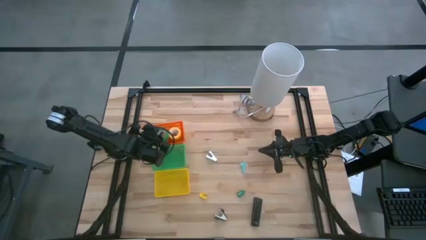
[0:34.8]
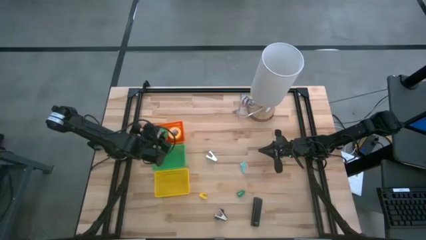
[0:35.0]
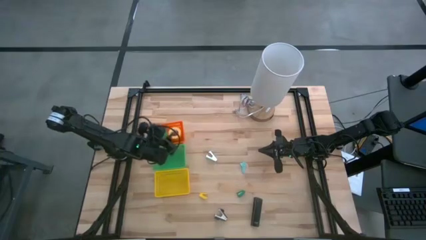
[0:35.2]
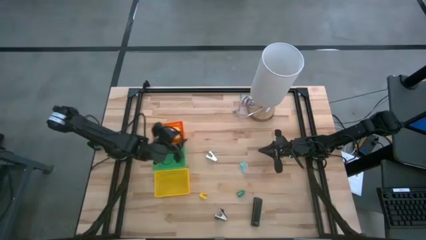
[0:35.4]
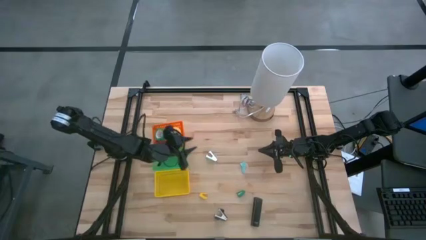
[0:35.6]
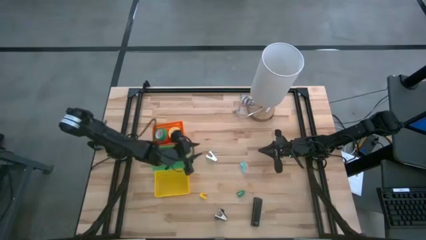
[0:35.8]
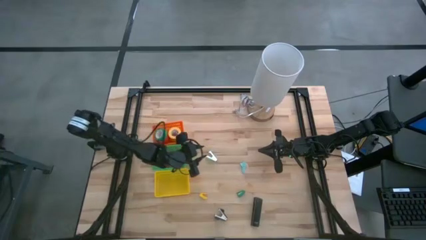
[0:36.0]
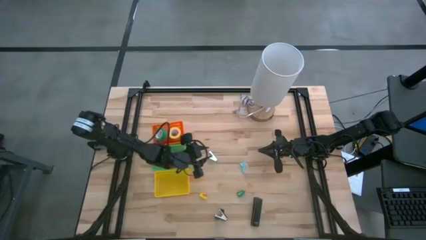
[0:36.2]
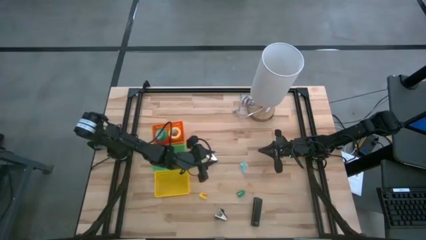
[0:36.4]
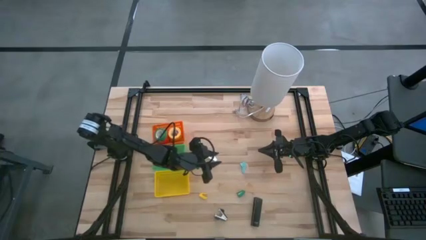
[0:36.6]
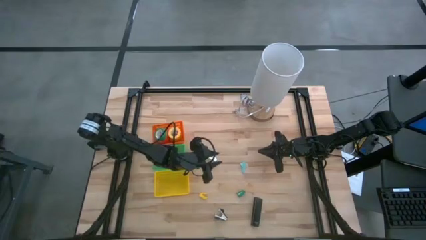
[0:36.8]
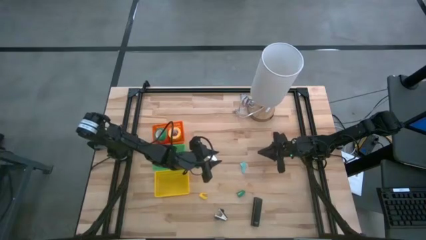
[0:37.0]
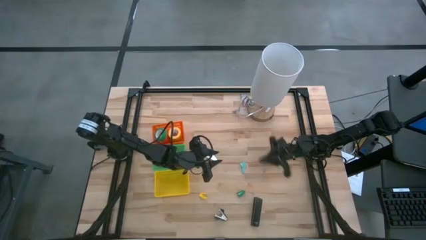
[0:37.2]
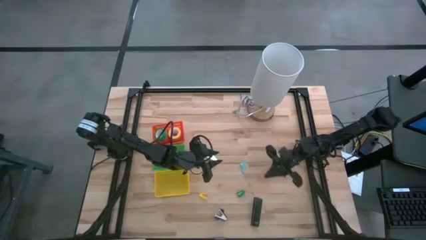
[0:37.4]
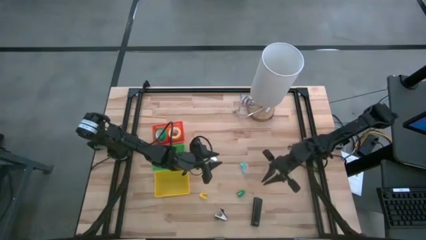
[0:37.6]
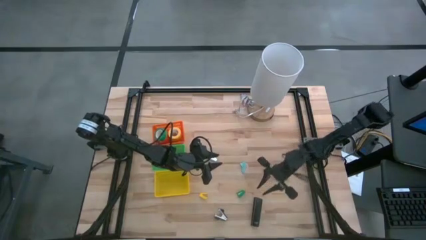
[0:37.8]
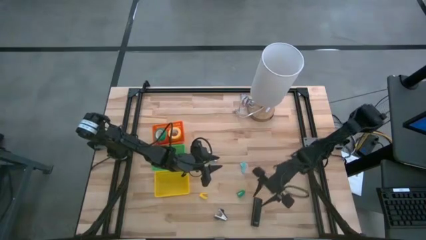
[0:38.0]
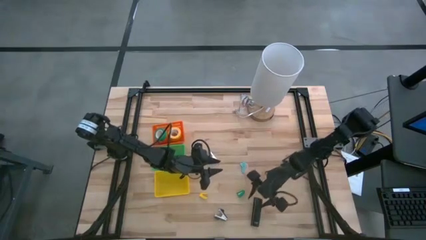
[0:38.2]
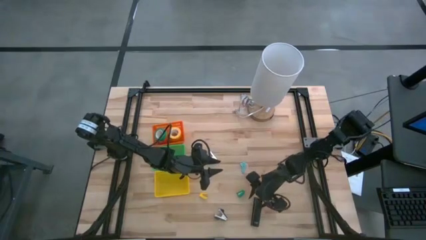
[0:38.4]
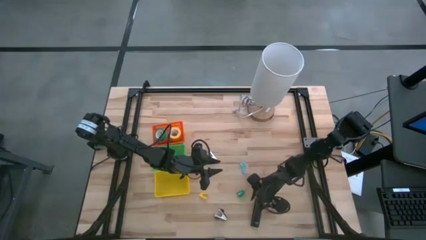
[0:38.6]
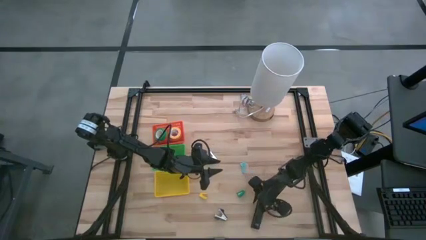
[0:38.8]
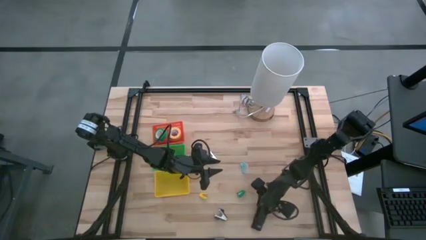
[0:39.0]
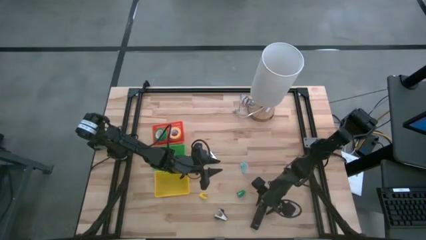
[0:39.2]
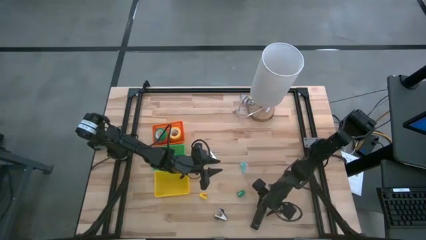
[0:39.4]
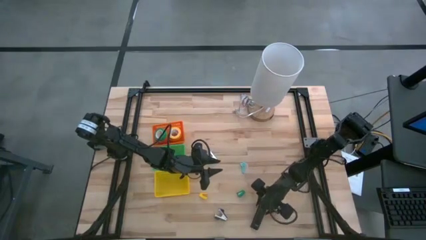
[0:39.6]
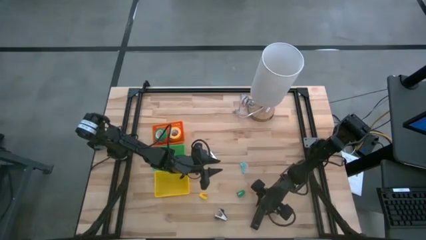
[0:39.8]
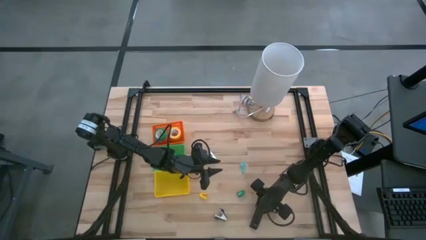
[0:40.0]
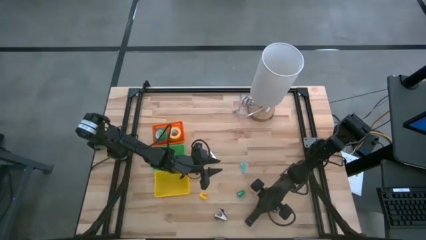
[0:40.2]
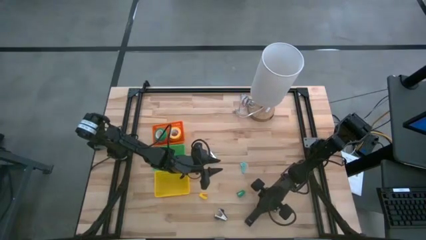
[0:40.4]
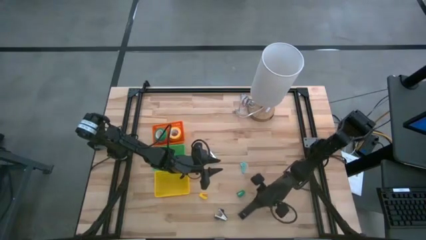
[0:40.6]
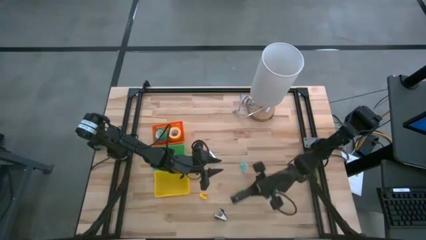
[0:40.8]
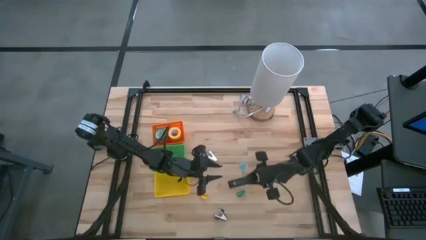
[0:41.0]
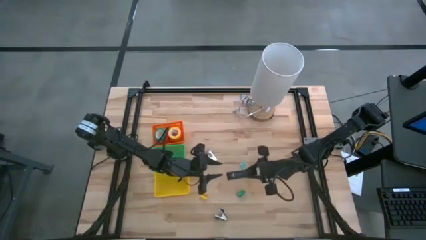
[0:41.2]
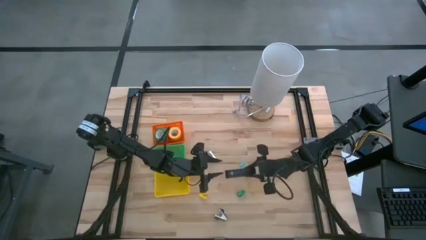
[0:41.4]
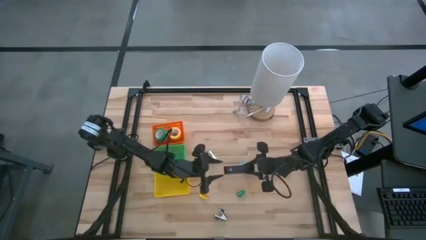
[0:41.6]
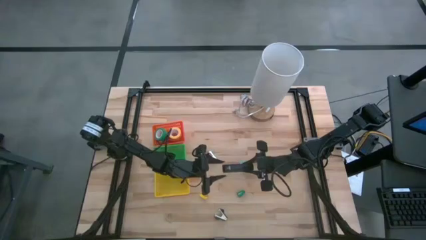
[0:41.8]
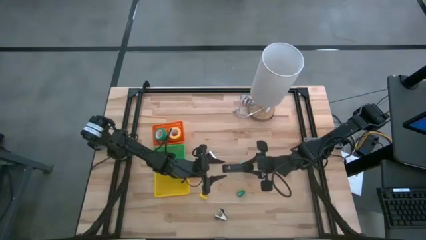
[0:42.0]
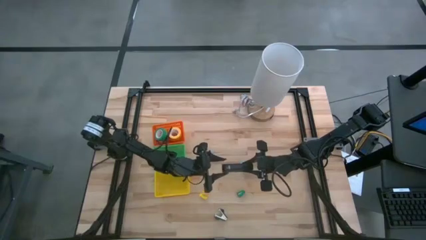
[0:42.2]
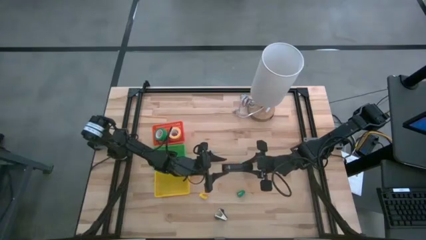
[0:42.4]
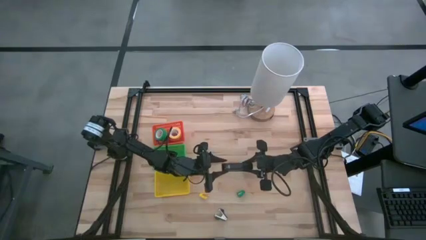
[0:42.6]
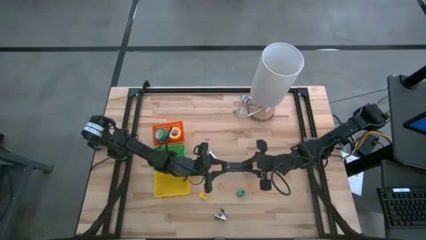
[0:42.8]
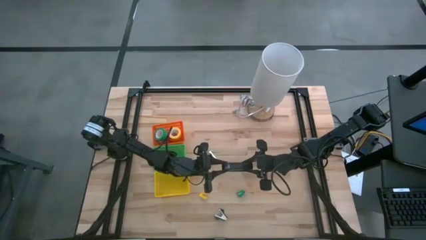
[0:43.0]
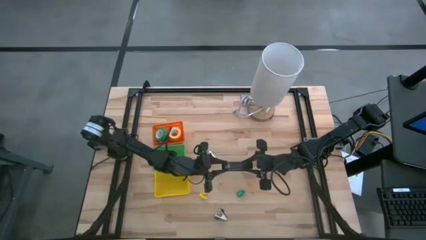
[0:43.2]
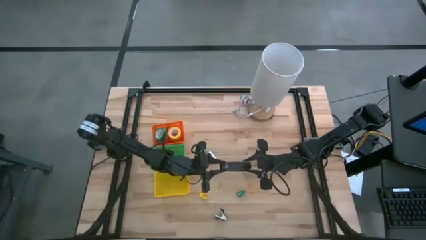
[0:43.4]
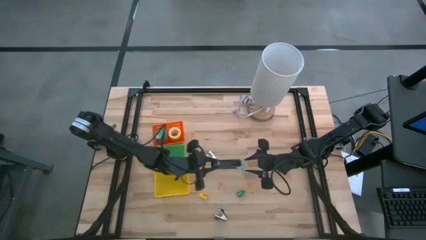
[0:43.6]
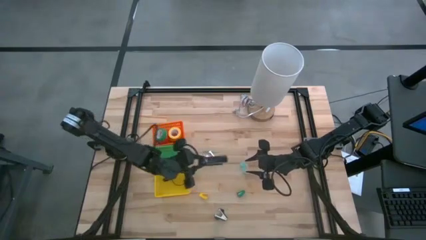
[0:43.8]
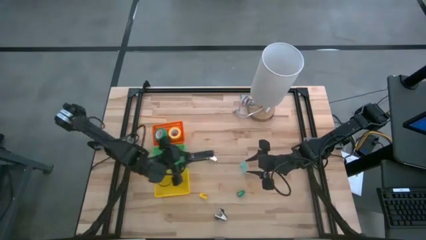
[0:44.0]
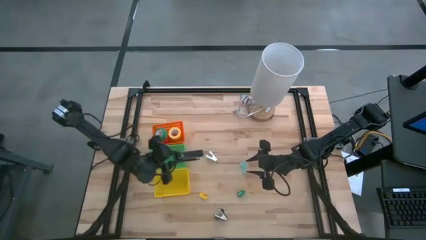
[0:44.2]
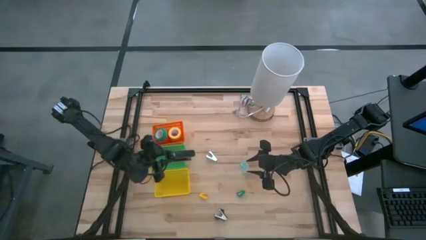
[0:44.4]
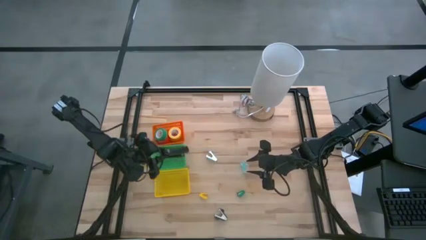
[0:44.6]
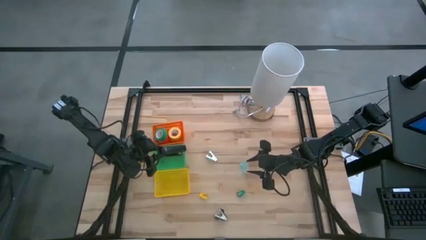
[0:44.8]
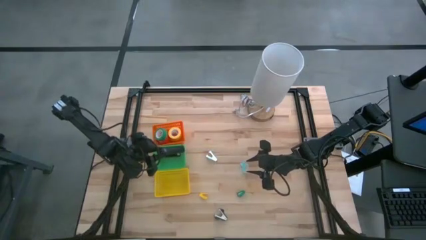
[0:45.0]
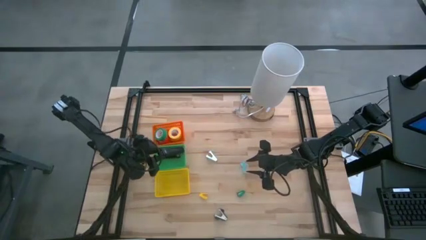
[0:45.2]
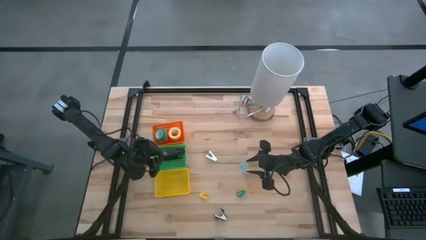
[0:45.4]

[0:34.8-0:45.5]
Task: Pick and place Stapler, Stapler remover, tape
Put the black stapler into the green basket

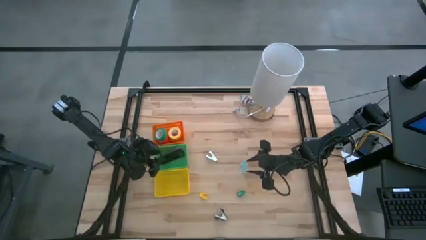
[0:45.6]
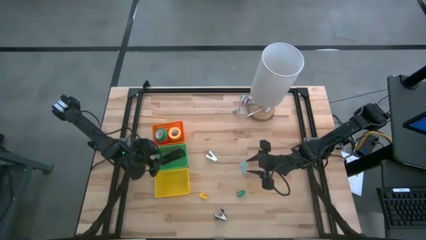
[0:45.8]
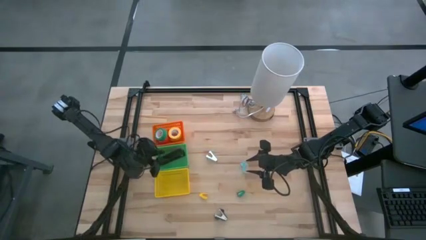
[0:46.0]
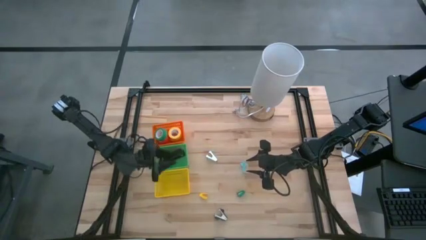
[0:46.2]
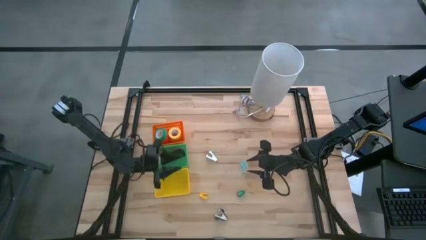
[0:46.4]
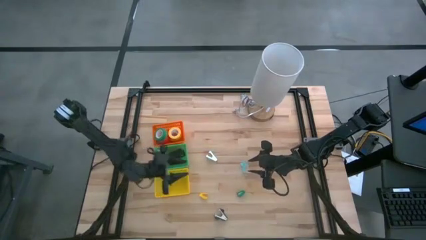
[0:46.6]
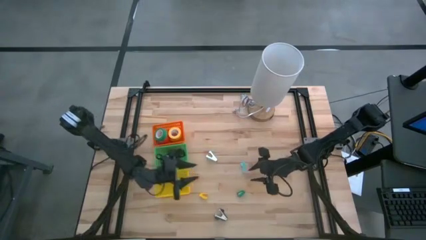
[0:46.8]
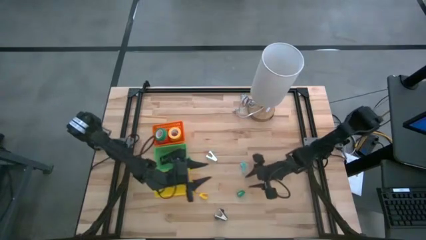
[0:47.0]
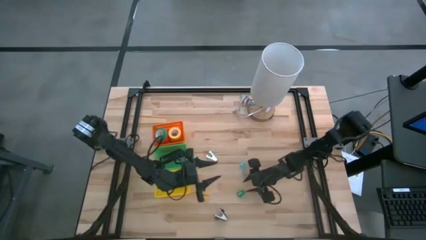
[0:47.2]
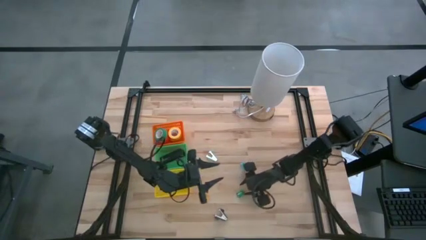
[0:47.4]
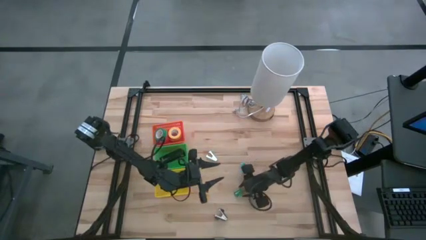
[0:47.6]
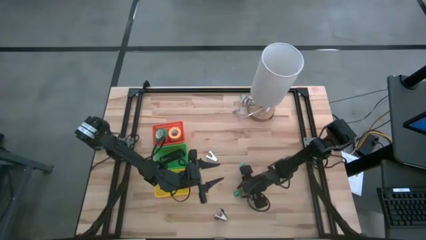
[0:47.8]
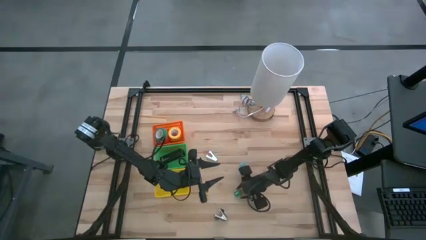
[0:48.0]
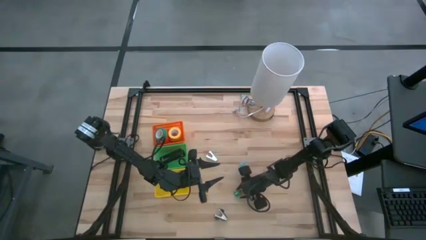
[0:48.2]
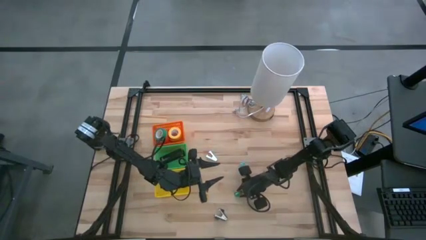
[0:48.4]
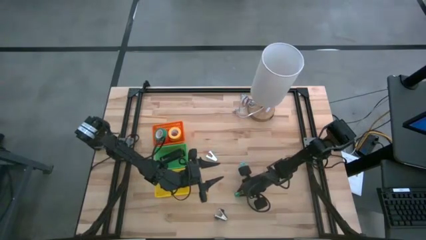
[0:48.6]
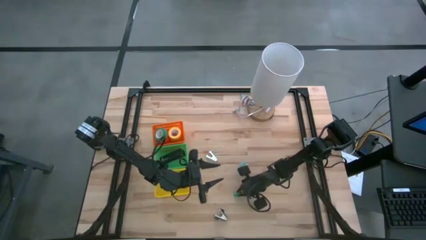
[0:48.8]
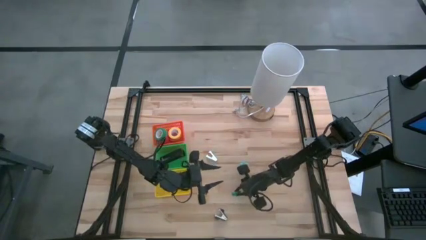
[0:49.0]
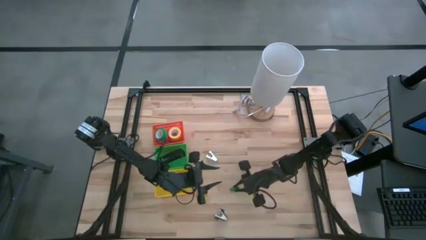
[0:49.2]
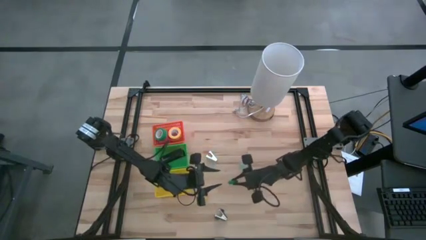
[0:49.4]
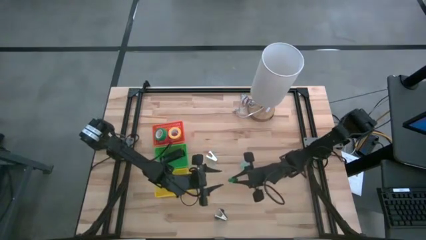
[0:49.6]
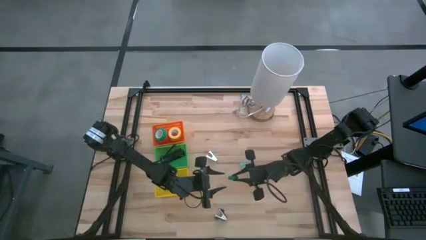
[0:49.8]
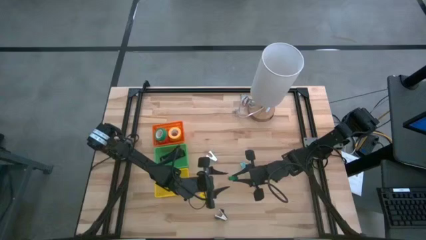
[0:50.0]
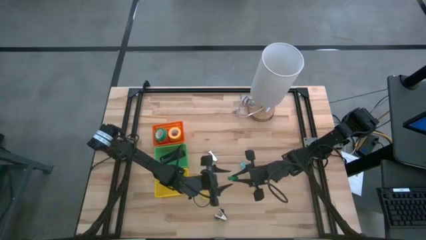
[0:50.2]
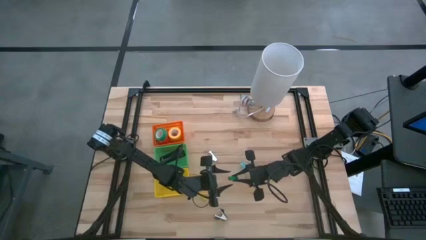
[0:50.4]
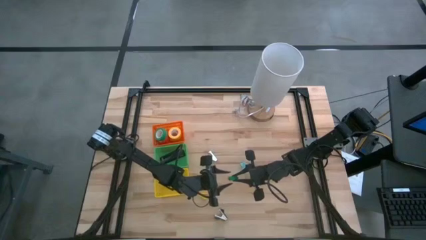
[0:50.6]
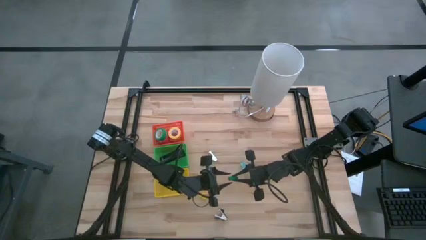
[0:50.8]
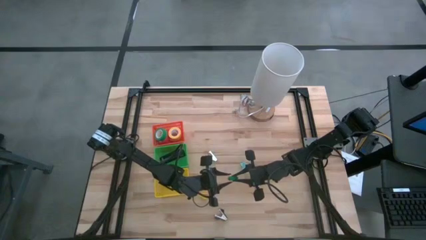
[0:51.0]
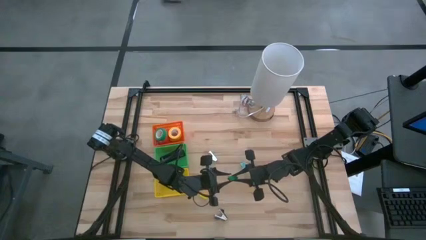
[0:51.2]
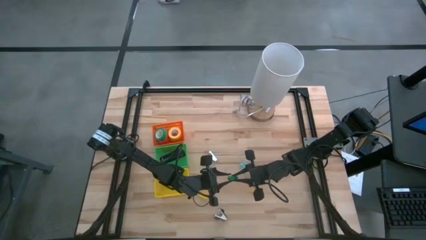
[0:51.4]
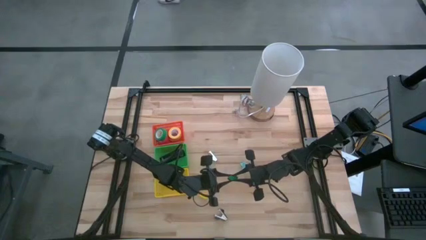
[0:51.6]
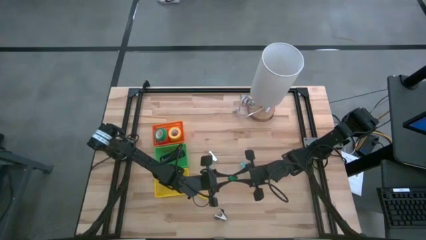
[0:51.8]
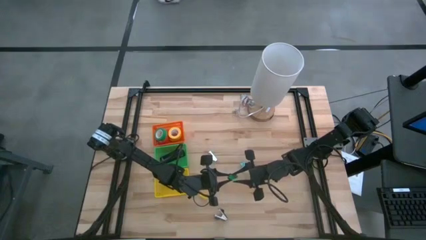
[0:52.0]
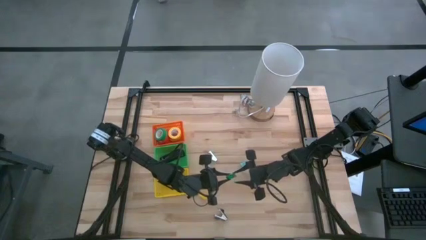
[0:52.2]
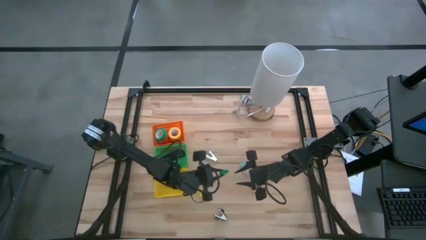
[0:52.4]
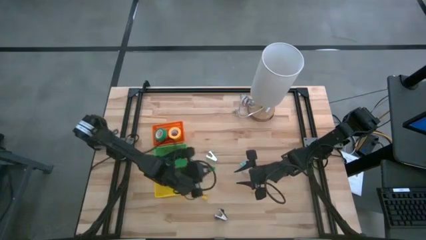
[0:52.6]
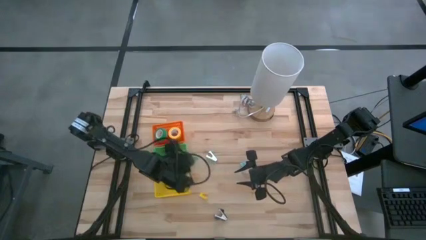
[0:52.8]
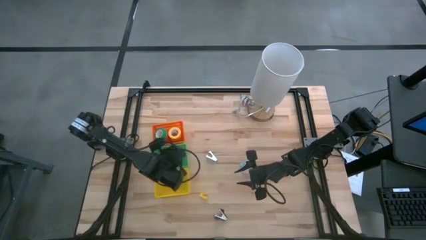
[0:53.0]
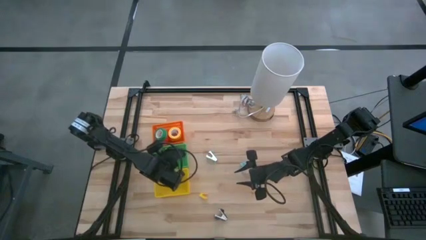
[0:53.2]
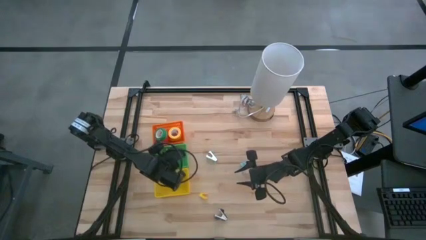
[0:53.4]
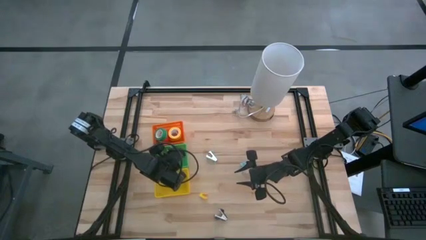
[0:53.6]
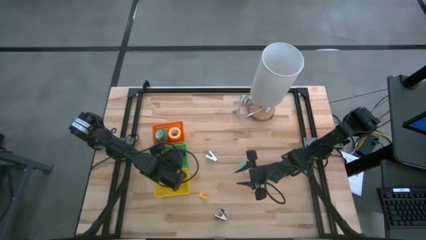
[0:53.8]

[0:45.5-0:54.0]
Put the green stapler into the green basket
